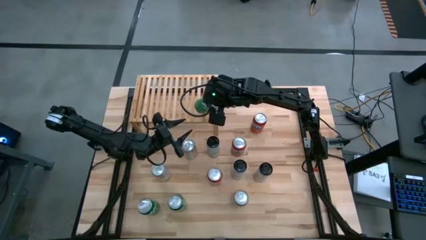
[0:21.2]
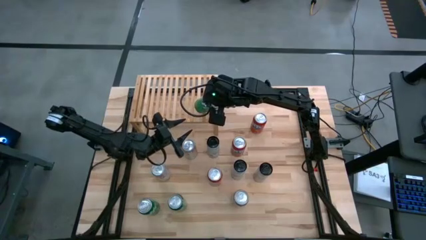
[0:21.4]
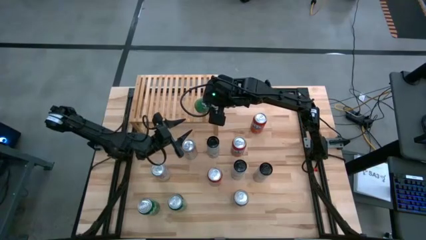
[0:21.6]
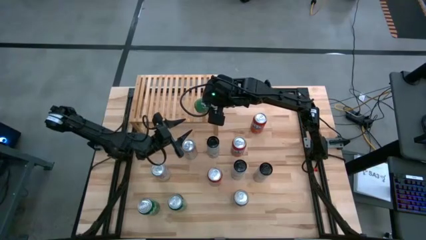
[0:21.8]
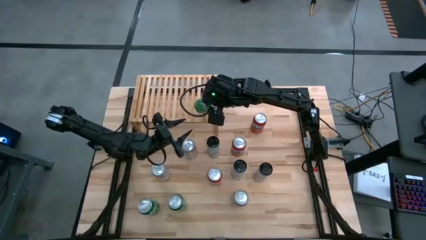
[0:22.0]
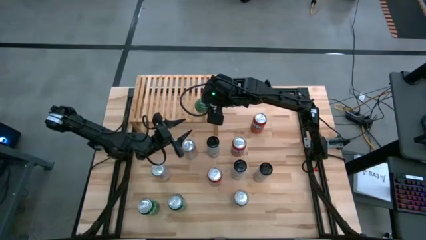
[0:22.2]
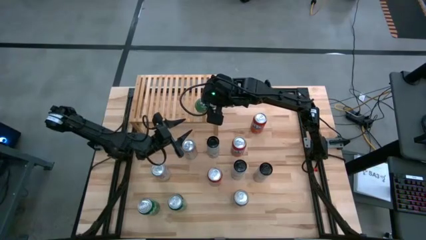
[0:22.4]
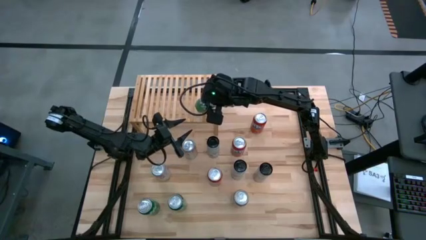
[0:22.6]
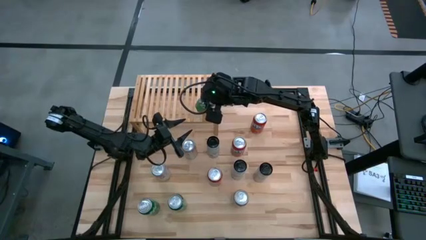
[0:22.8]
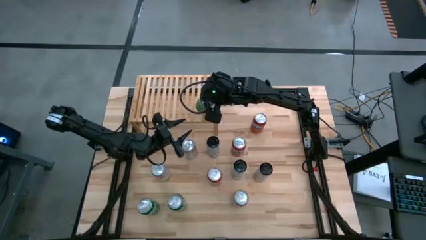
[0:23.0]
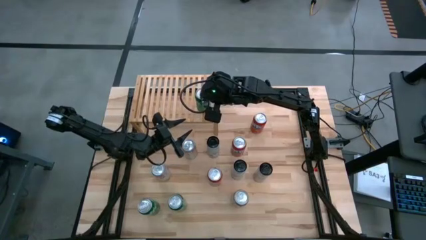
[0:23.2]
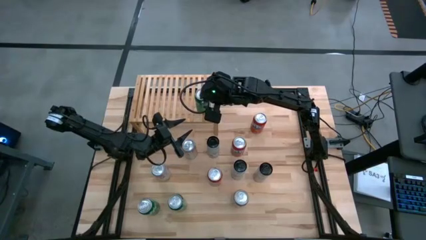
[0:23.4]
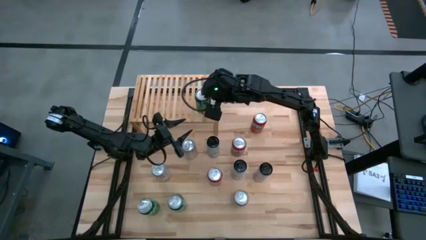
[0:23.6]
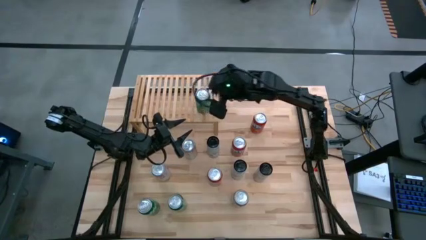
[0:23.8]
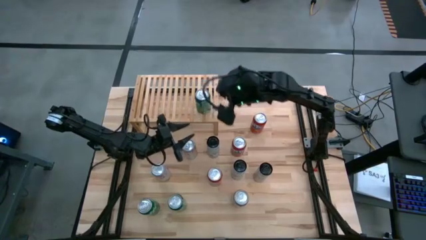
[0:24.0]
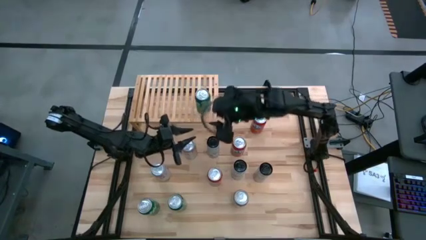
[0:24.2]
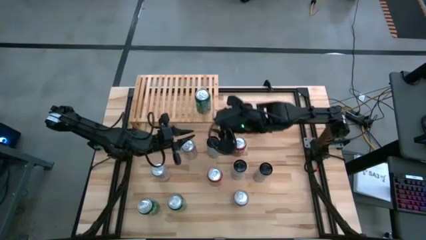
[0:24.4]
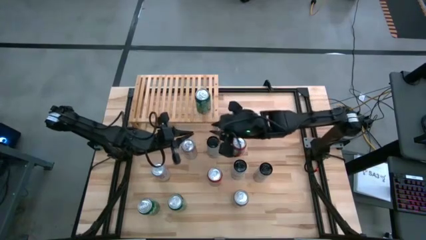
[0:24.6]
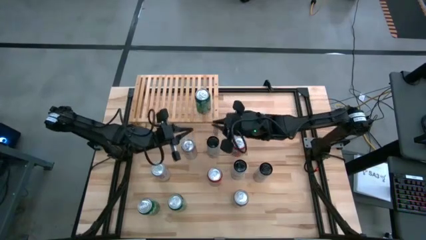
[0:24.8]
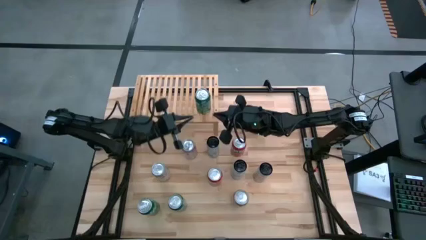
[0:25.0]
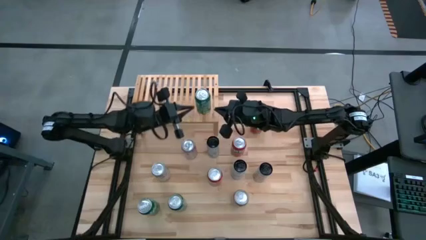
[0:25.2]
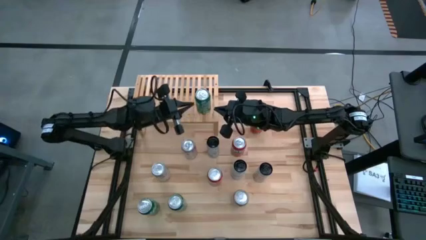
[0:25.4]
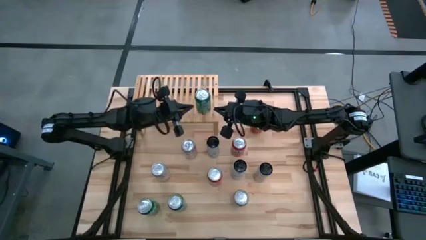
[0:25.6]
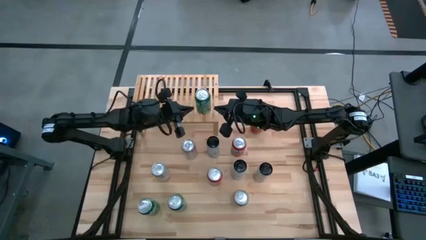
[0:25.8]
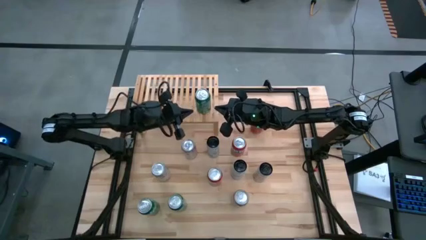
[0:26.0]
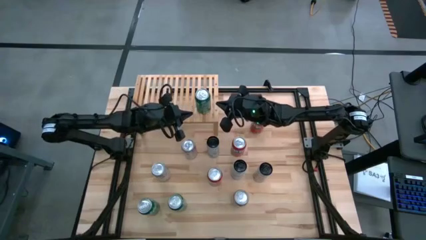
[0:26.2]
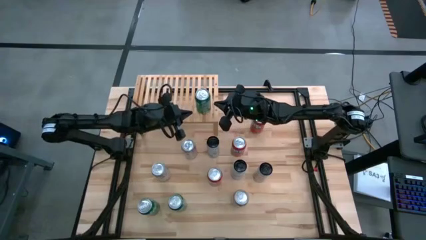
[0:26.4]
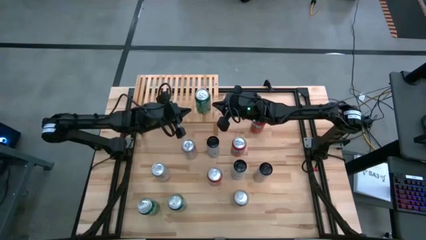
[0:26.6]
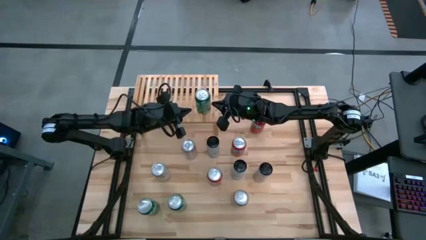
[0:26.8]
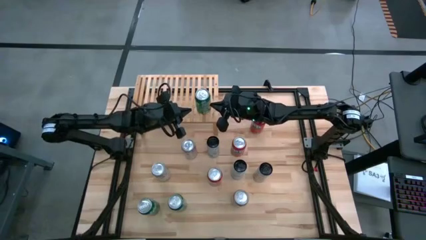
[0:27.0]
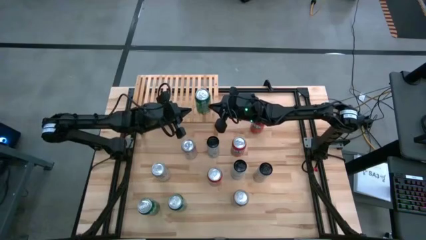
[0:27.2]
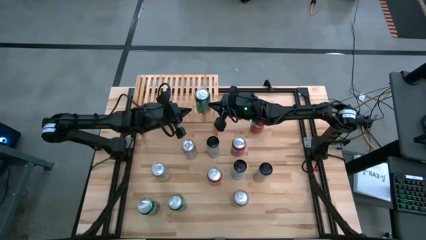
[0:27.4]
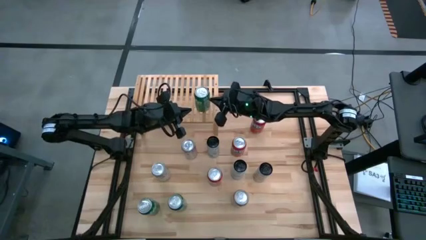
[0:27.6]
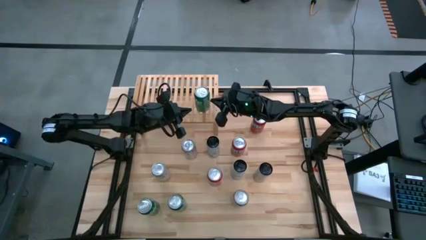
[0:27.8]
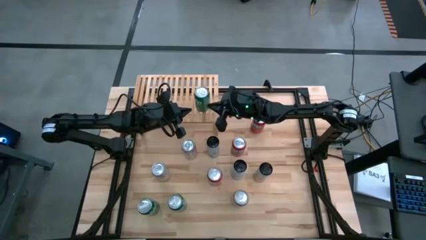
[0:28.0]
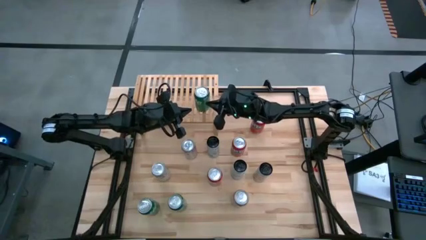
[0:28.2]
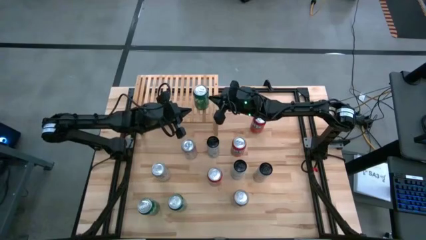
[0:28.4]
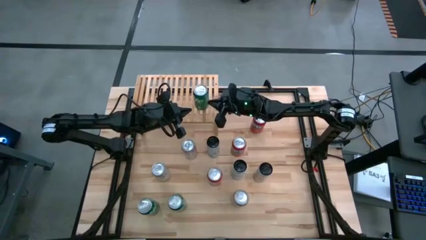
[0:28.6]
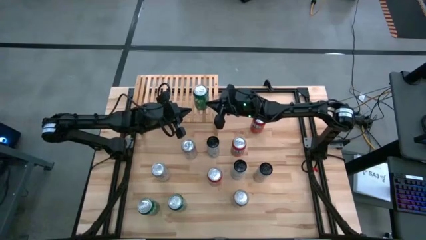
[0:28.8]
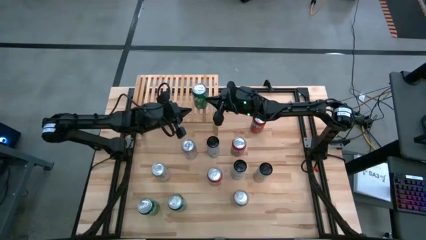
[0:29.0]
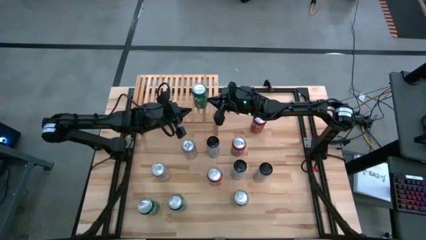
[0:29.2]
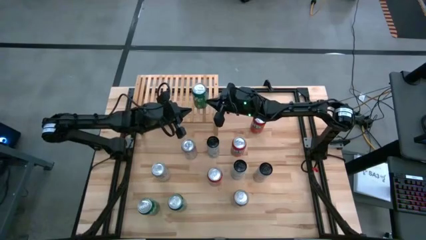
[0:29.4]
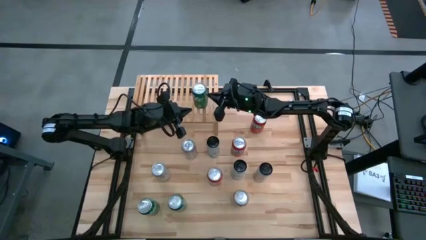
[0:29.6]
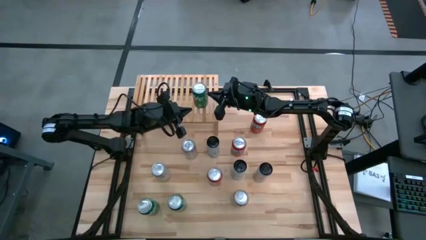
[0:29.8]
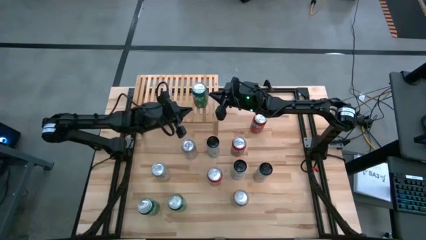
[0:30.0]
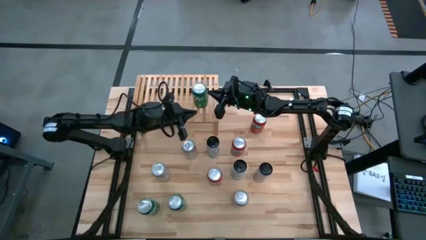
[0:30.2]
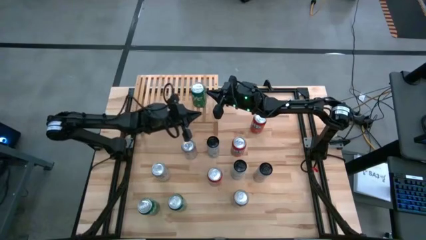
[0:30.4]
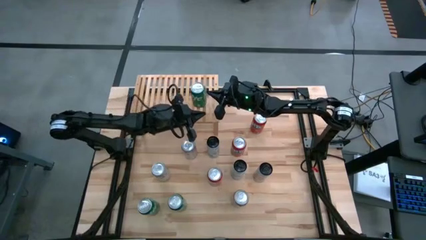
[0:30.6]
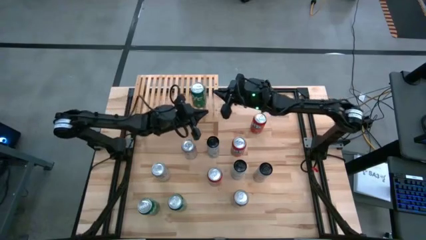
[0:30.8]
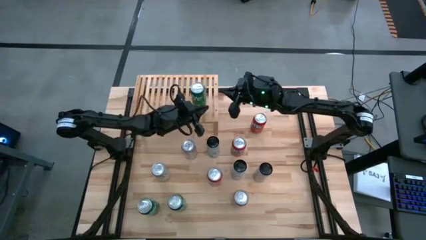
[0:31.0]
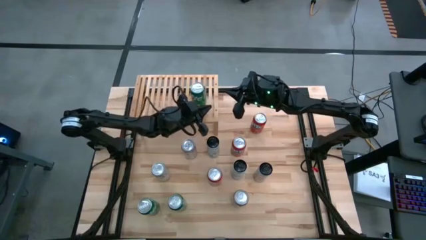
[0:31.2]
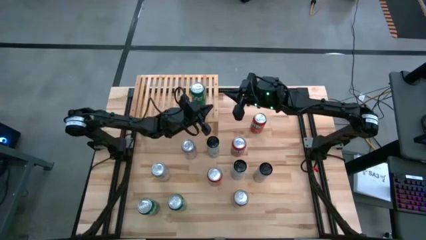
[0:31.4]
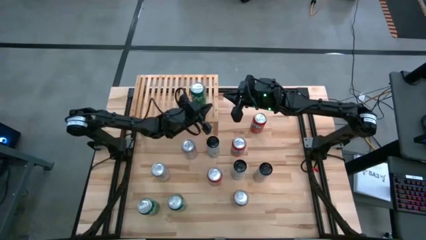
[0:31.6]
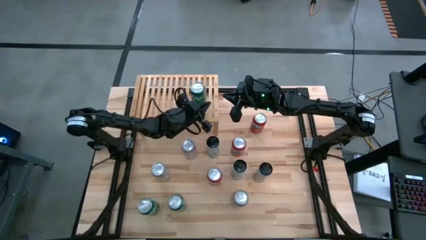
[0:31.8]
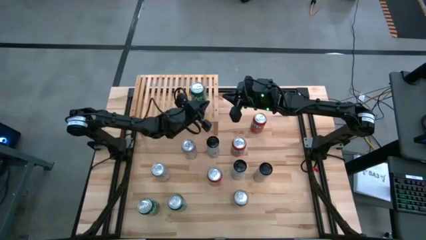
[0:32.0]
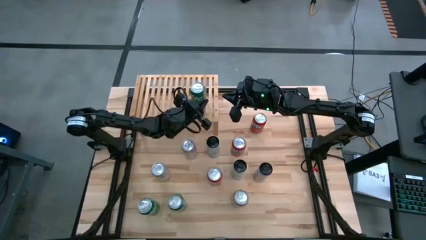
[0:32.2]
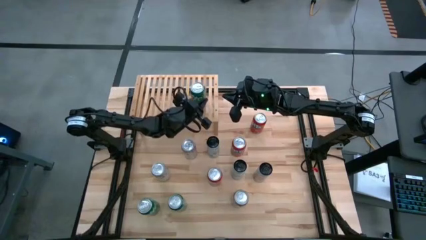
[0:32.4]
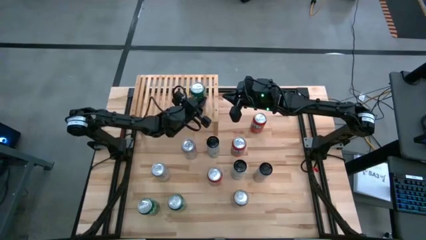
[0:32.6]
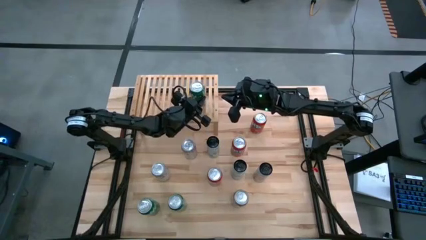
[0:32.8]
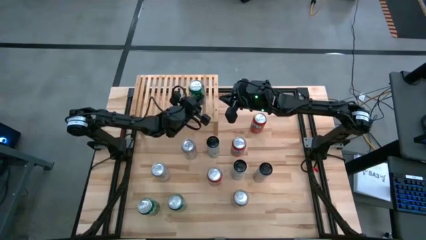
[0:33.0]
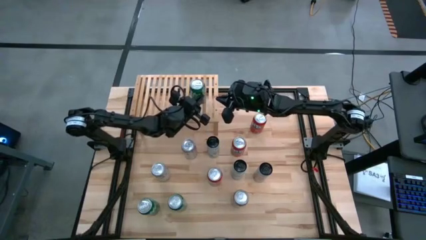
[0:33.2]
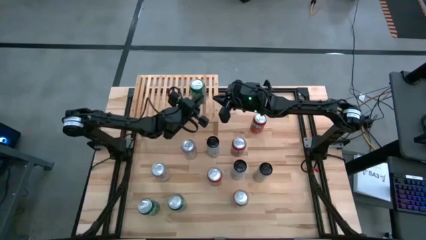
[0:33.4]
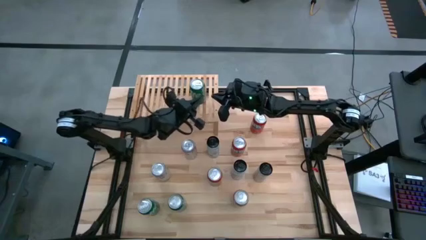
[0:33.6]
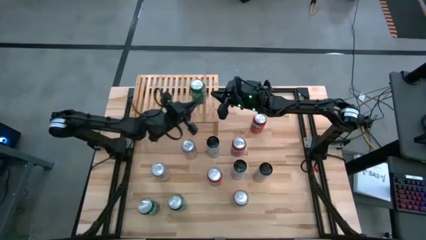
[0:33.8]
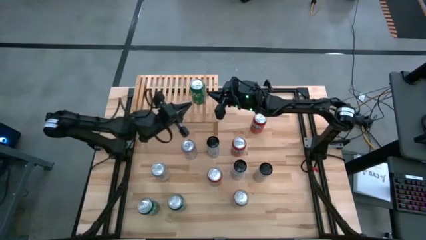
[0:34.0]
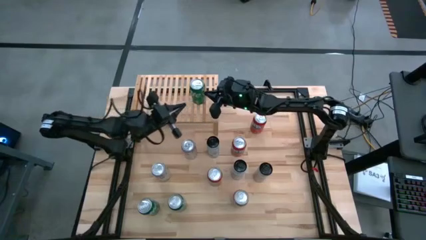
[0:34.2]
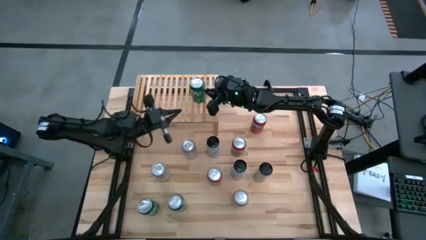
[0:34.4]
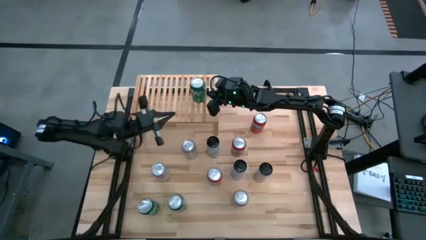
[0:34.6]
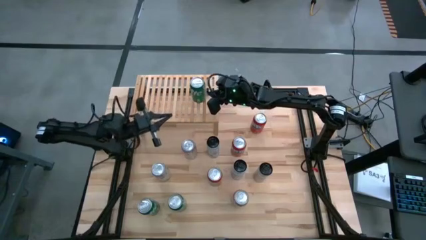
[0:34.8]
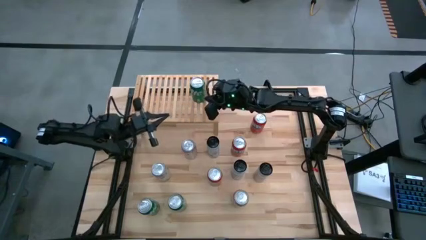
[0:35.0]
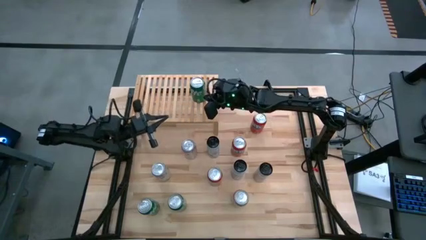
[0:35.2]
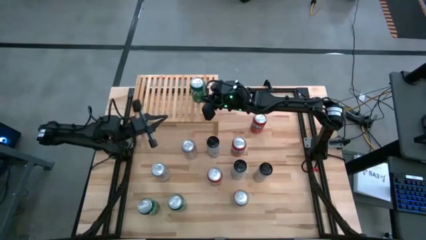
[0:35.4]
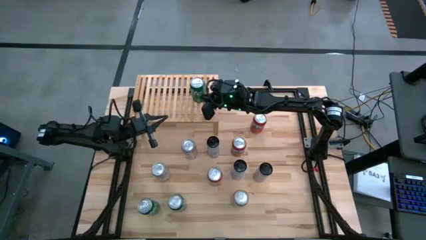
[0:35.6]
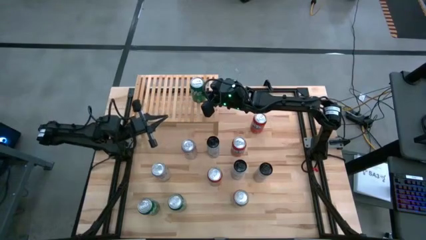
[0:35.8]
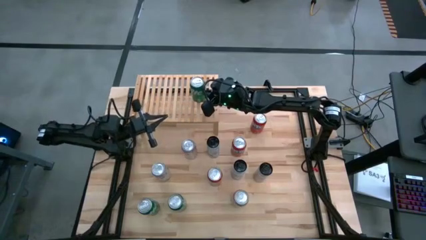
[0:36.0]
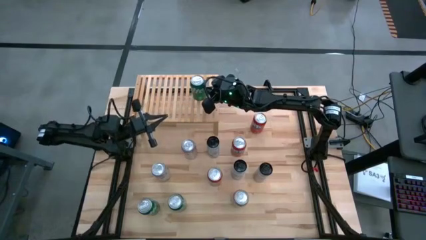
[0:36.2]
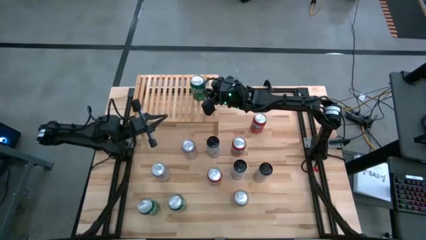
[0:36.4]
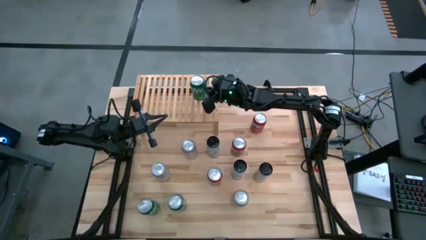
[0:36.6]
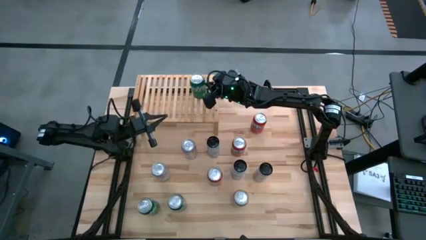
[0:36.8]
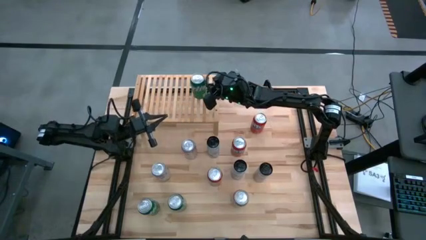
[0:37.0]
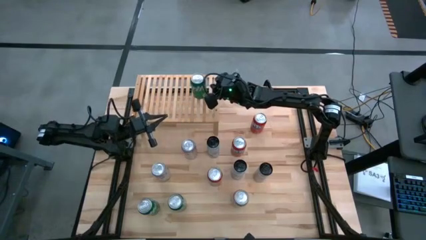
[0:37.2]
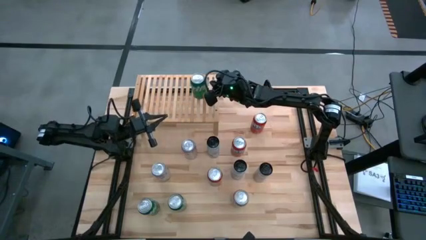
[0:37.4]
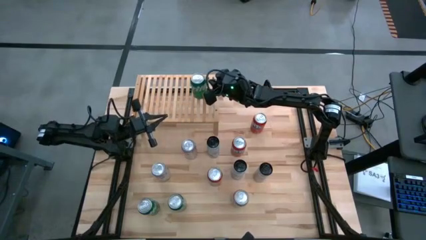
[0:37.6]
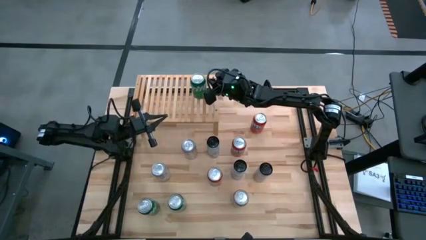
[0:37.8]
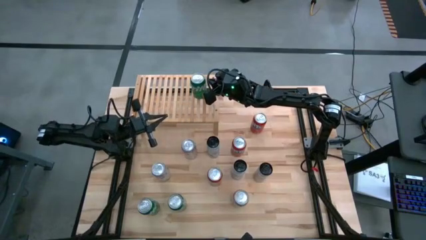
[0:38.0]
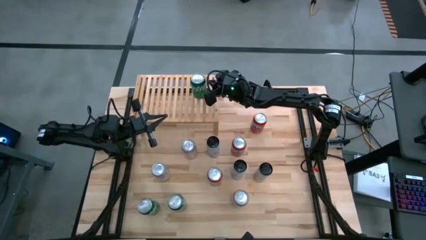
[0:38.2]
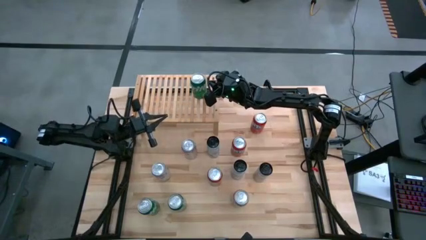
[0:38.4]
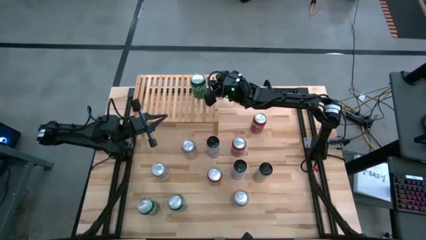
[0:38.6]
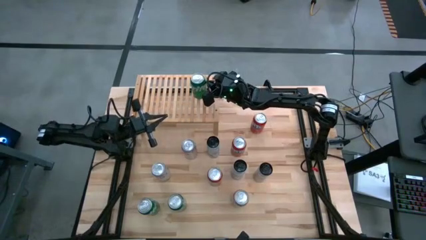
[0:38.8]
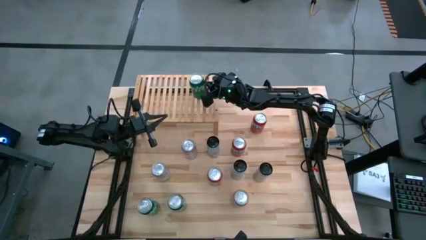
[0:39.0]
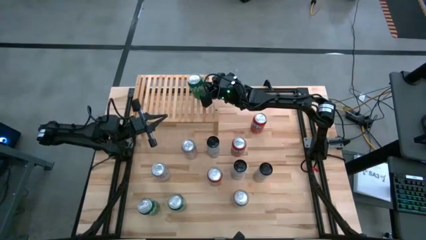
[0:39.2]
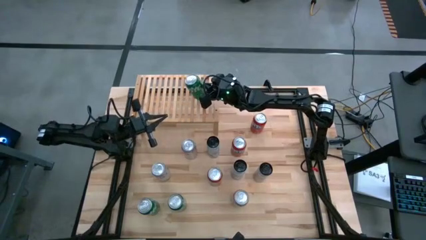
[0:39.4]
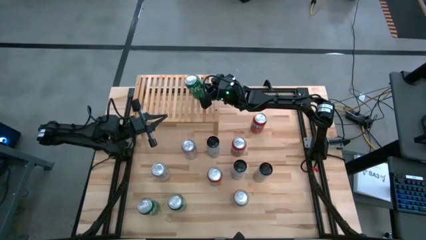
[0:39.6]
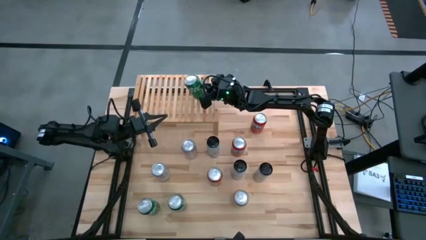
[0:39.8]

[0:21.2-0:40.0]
Task: Place canned beverage on shelf
Put the right green soda can on the shelf
